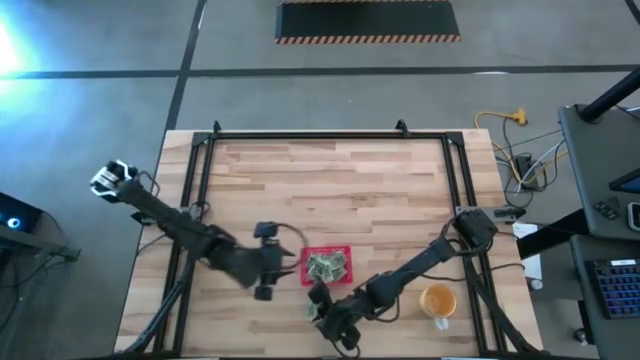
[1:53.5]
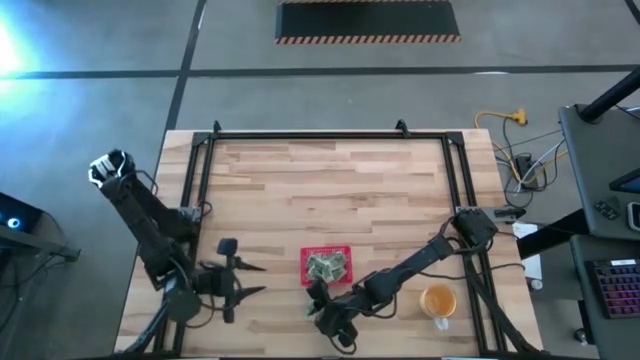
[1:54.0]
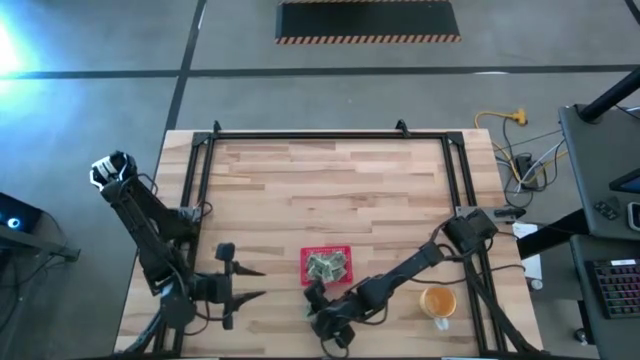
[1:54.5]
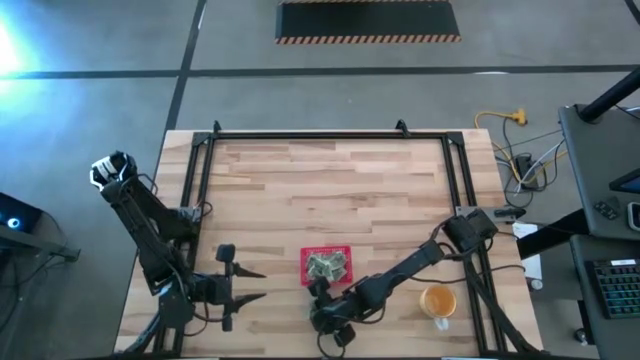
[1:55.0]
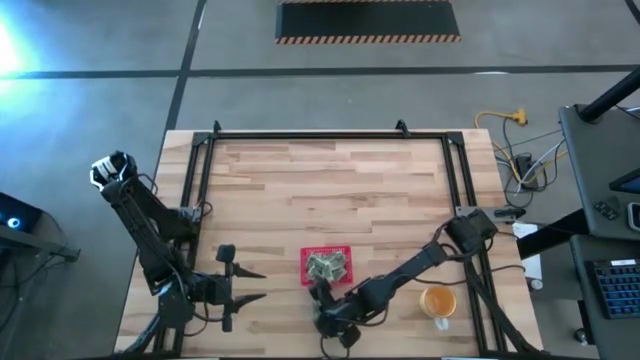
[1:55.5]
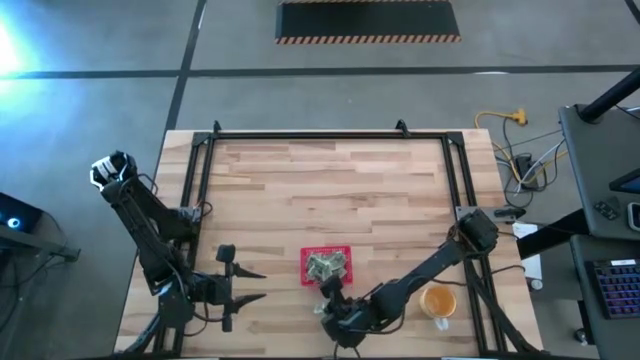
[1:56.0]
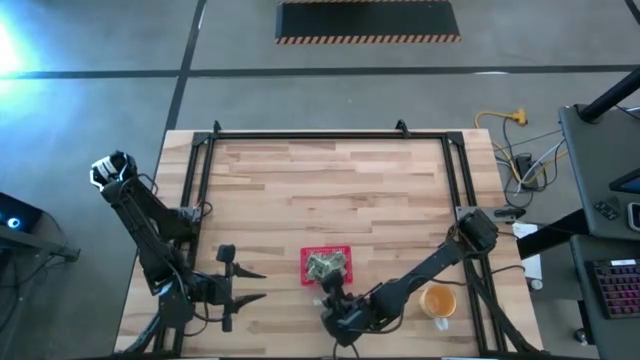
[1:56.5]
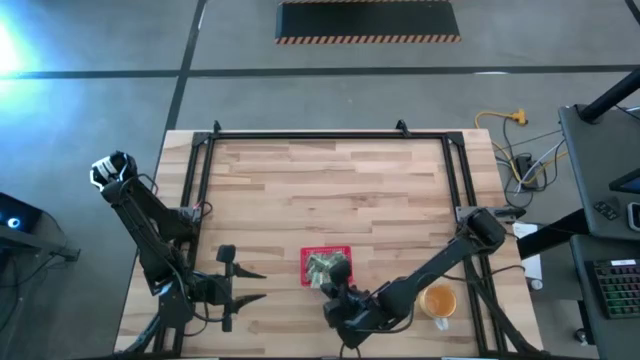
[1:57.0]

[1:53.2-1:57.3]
Task: Pick and place Stevia / Truvia into bins
Put the white stevia packet into the red bin

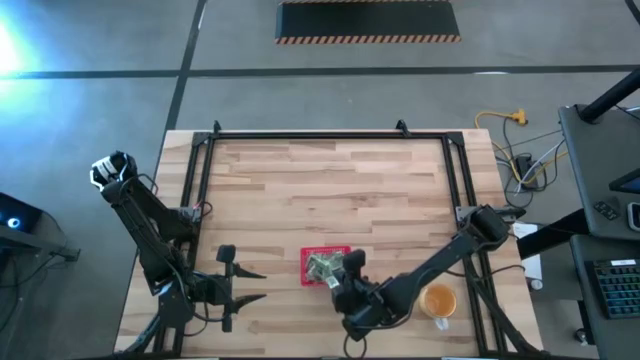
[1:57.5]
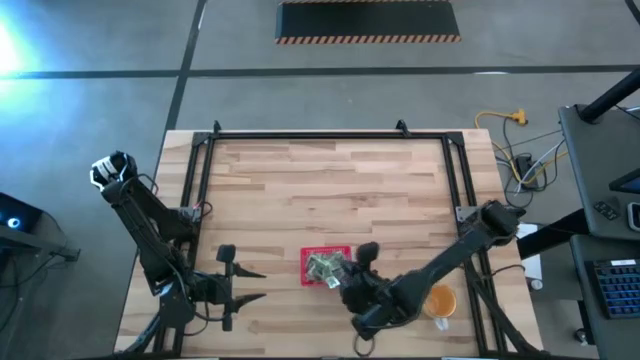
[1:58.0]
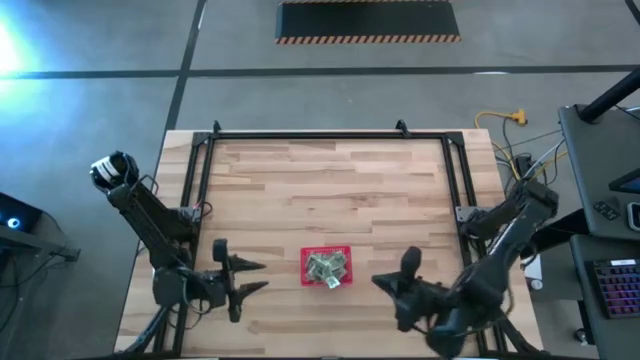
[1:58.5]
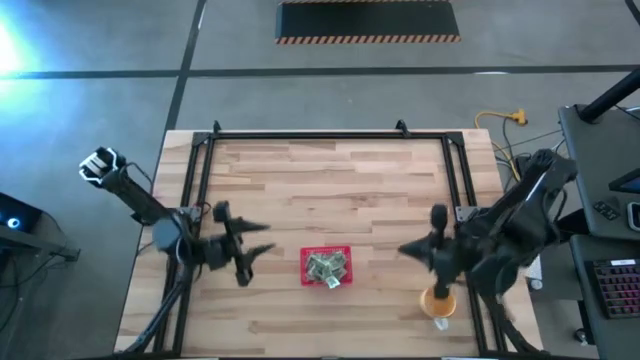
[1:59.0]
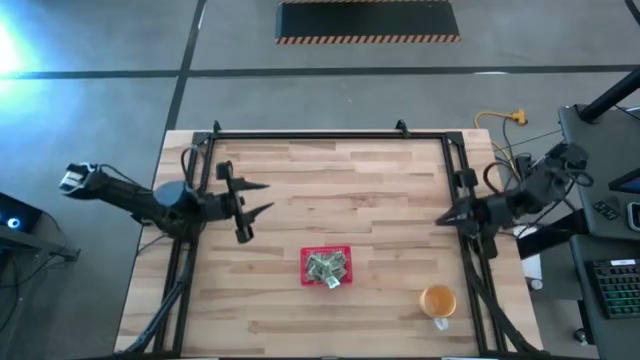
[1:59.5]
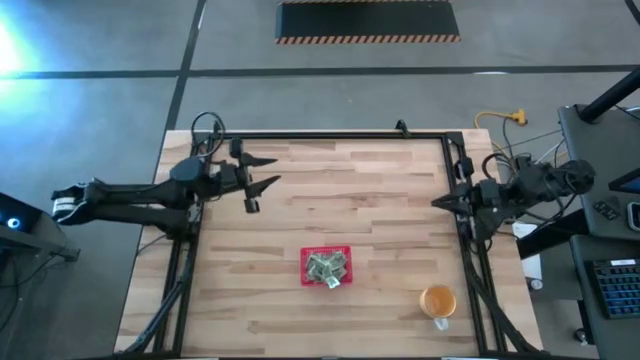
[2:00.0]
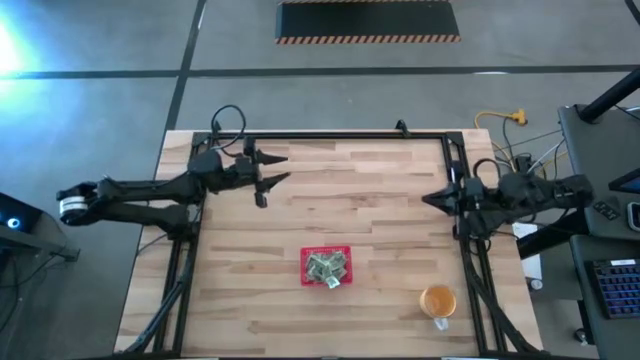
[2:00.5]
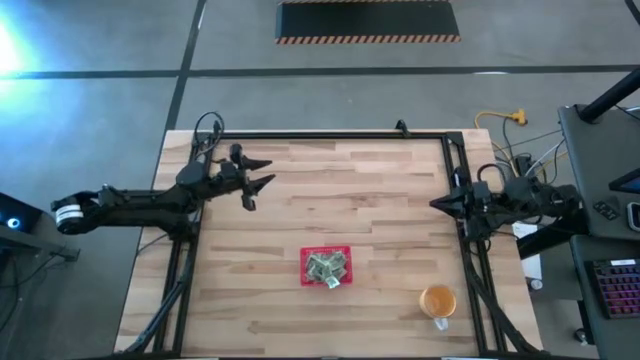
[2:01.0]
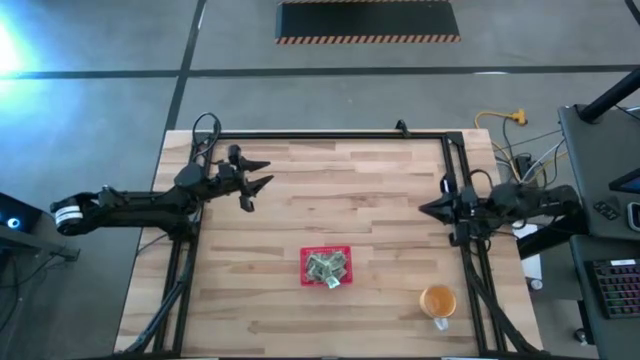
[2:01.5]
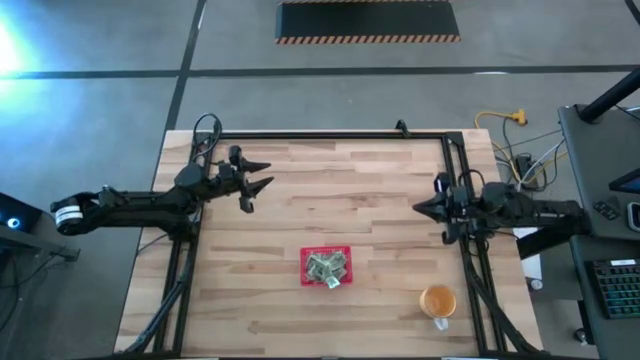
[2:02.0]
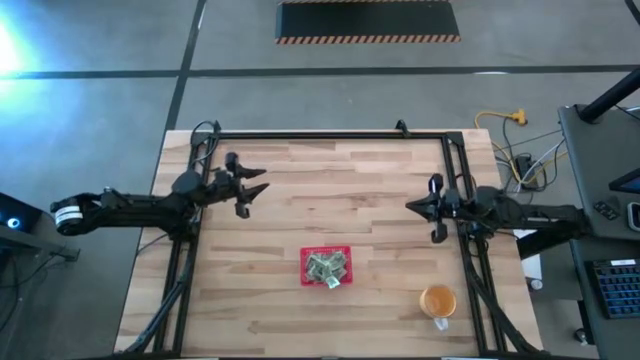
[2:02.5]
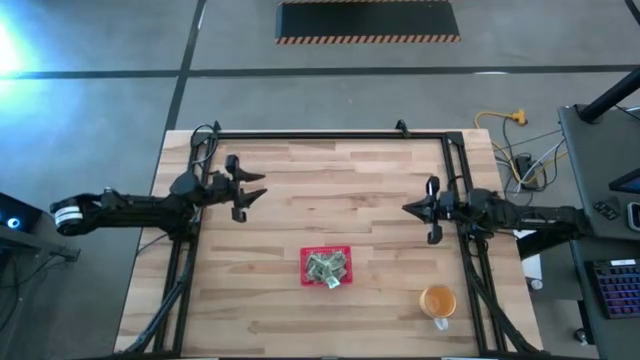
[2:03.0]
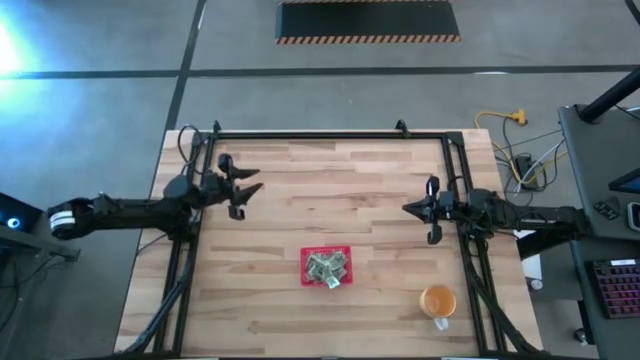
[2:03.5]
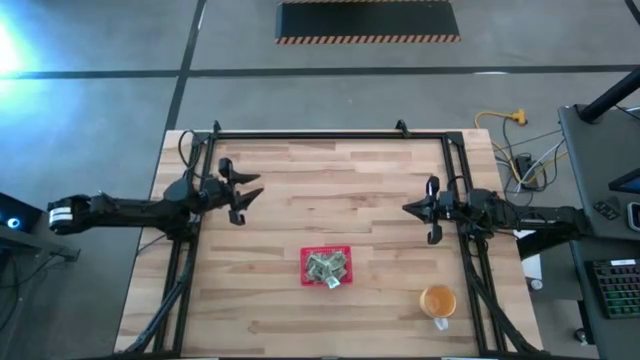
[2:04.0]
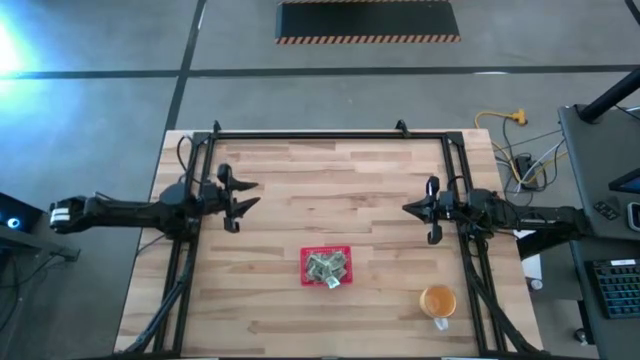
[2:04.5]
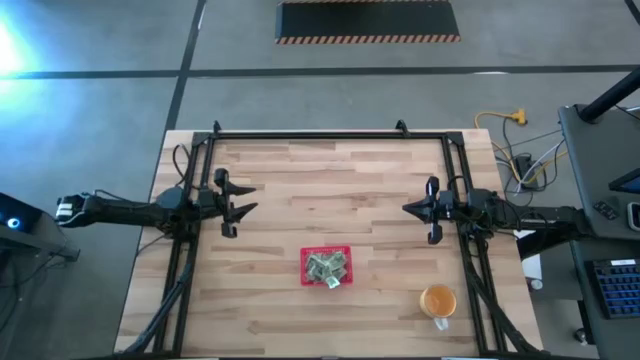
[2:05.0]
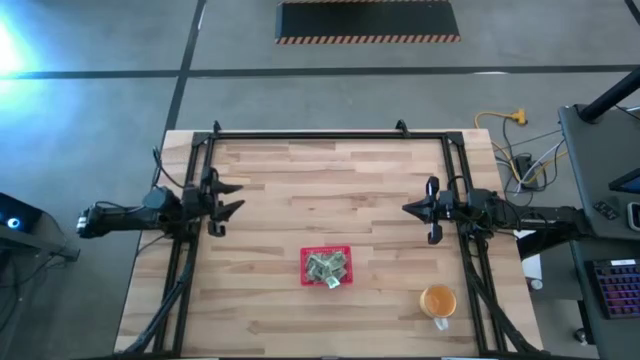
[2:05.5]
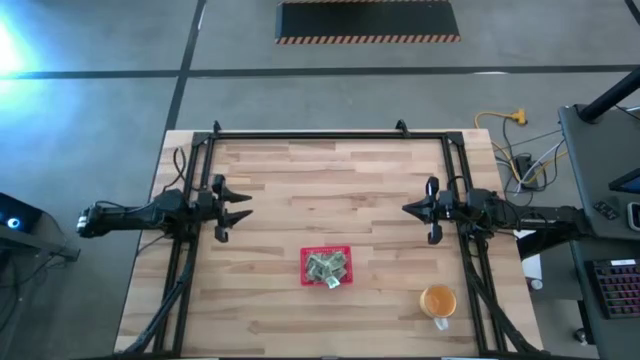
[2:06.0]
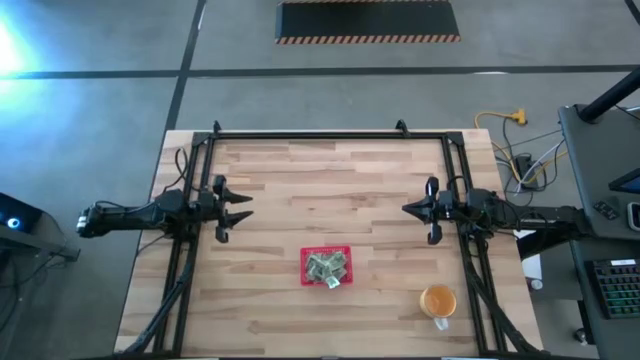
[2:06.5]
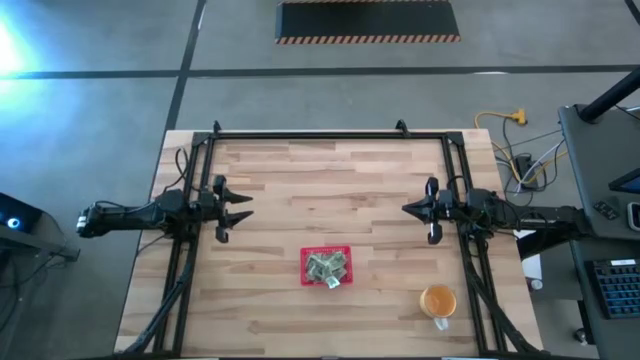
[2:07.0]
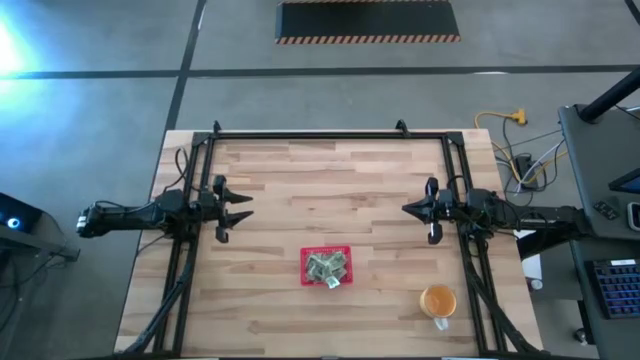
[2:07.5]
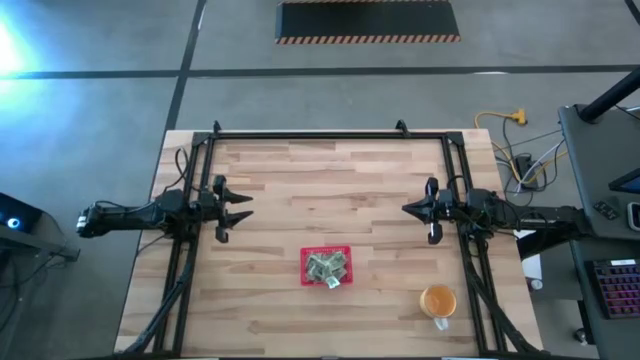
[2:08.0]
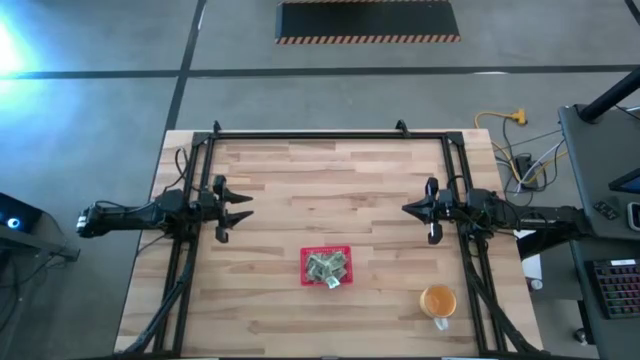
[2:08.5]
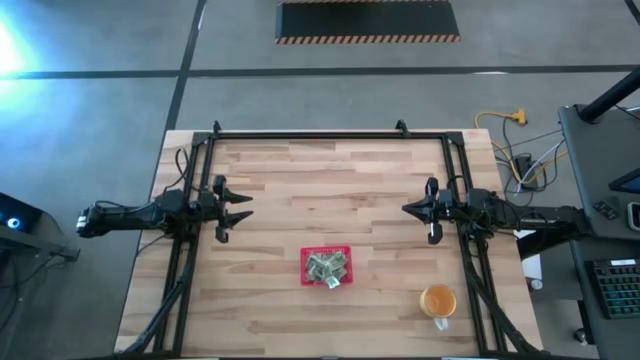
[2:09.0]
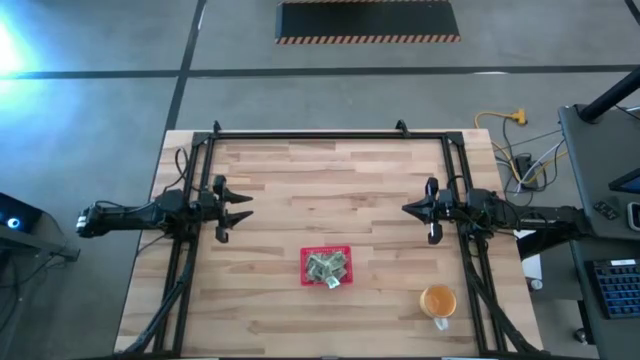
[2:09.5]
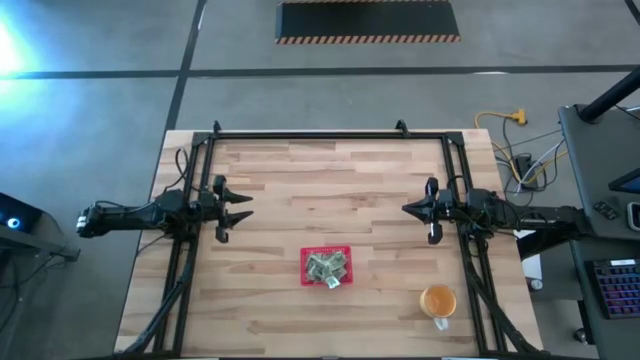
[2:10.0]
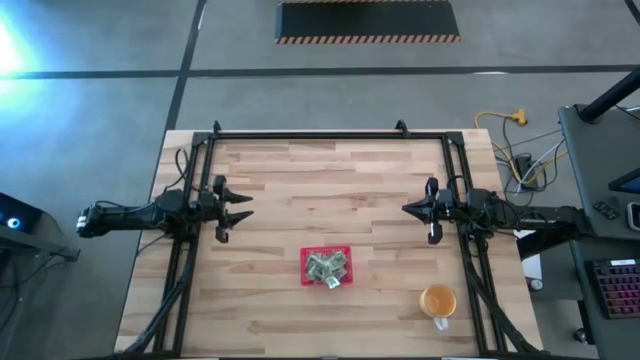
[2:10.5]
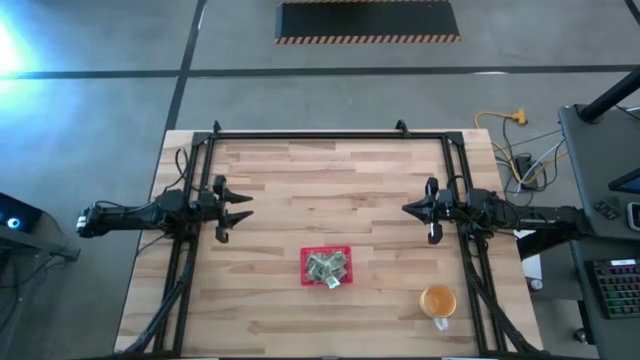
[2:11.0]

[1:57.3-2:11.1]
Return to Home Position

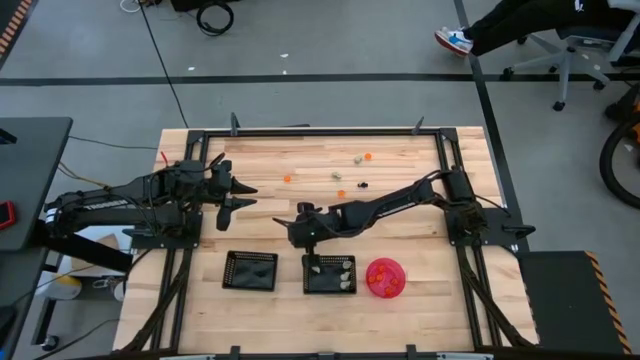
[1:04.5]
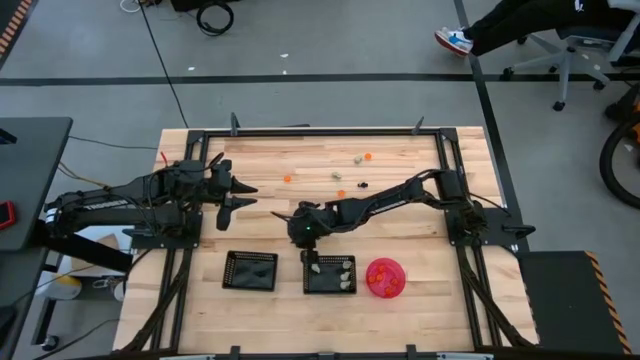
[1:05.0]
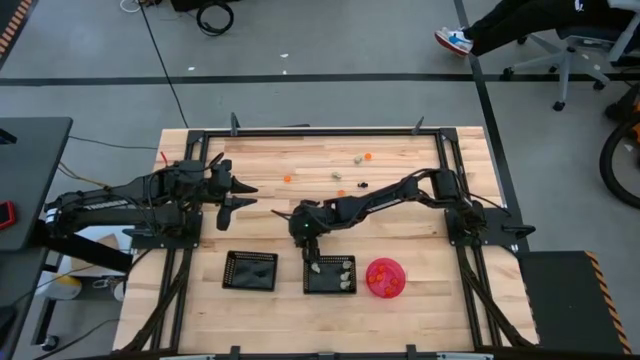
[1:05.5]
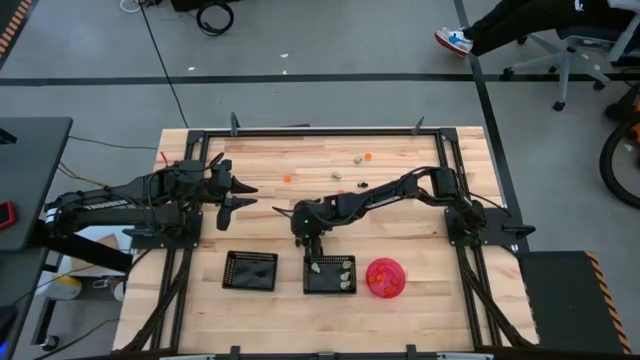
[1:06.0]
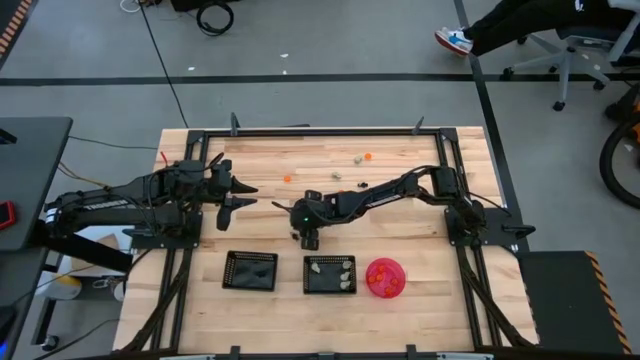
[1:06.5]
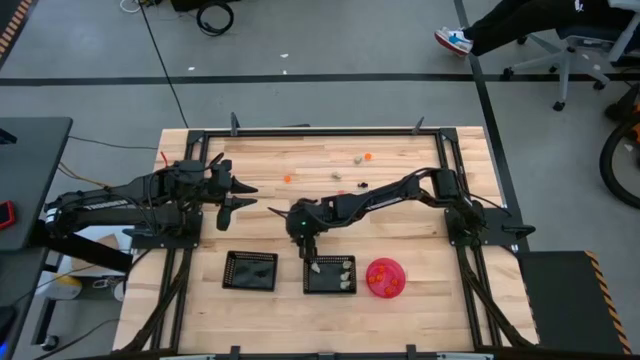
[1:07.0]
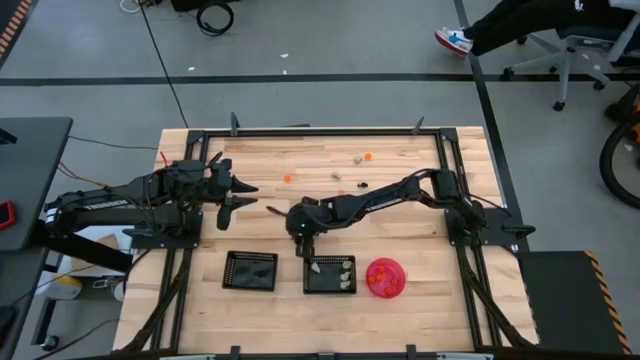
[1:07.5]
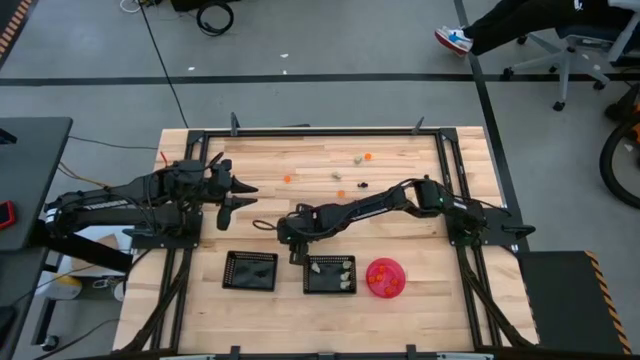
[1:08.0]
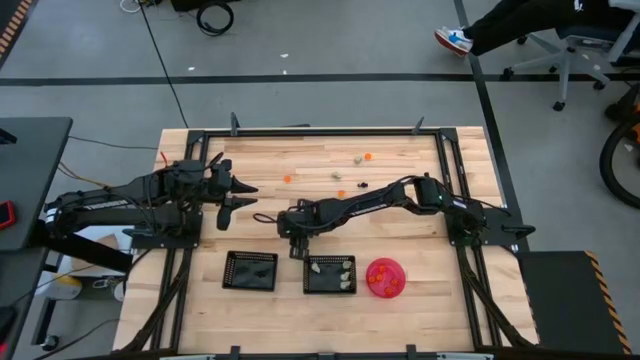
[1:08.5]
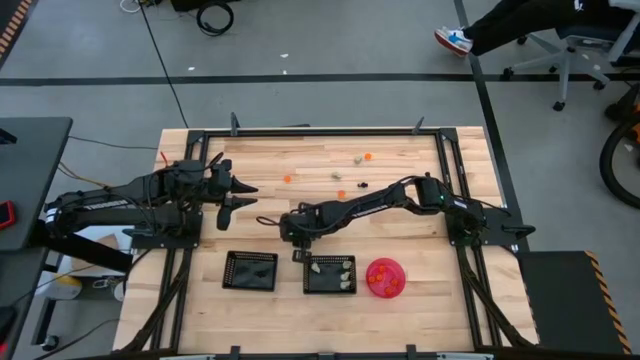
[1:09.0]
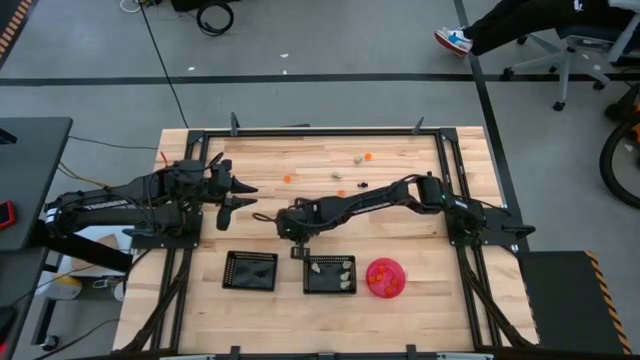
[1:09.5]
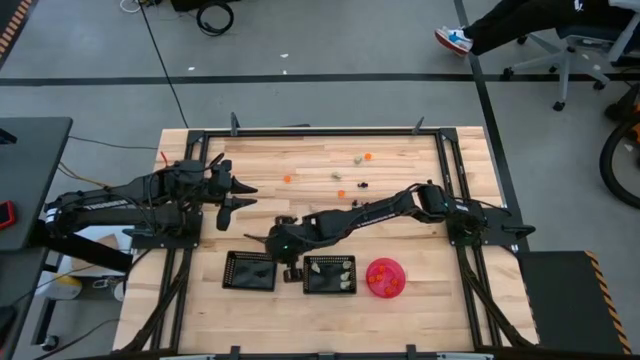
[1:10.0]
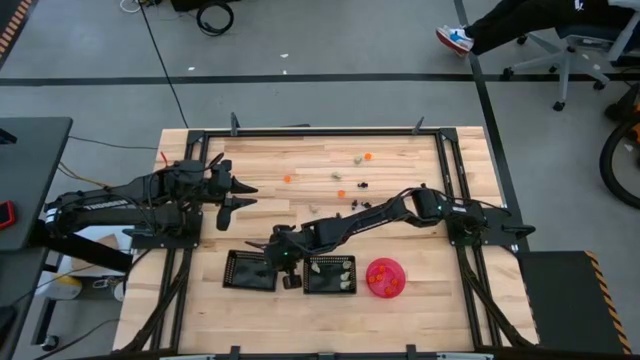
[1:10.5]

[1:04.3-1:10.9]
Task: Sort Halloween decoration
Put the black skeleton toy into the left black bin
